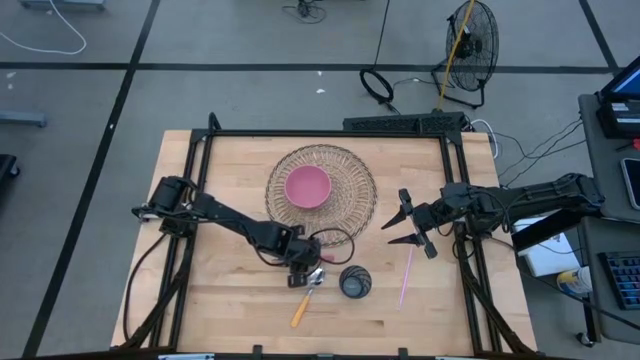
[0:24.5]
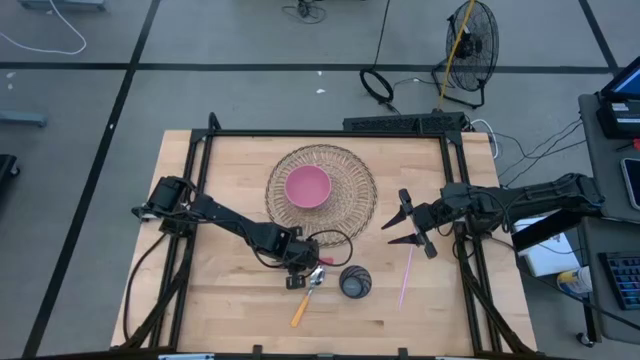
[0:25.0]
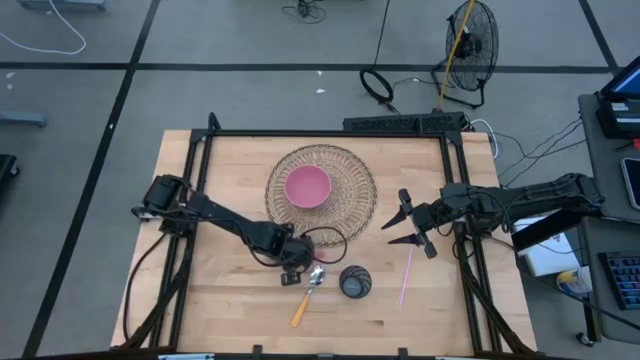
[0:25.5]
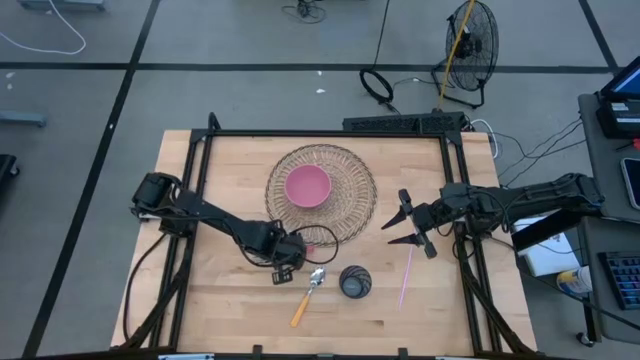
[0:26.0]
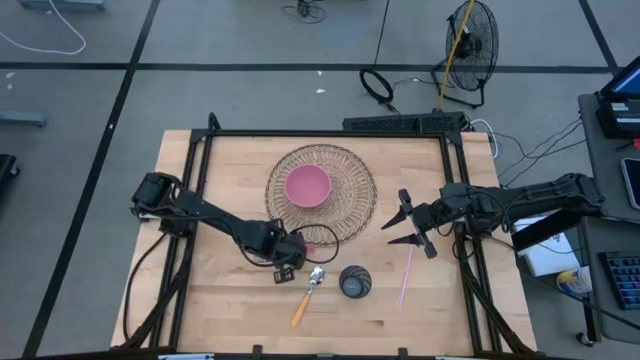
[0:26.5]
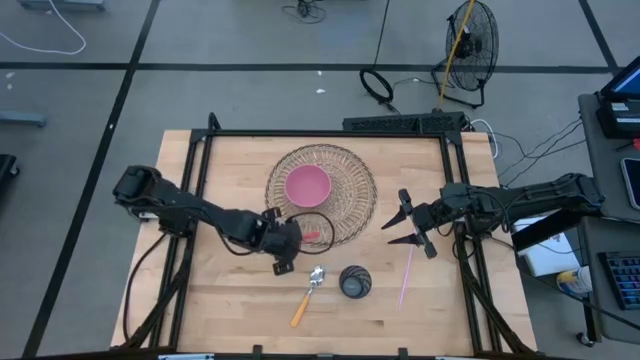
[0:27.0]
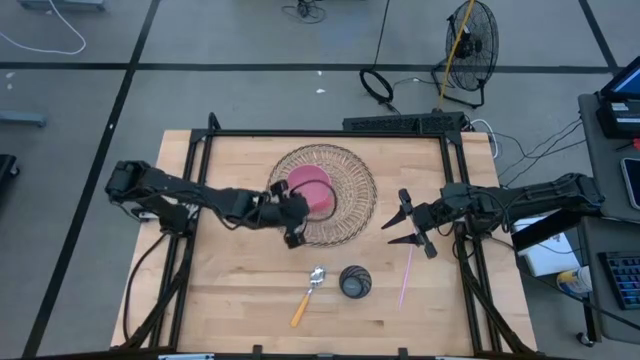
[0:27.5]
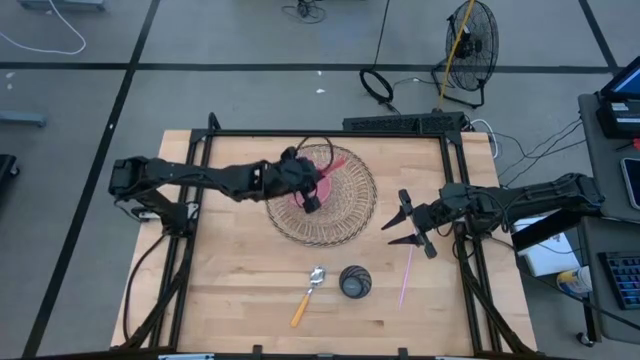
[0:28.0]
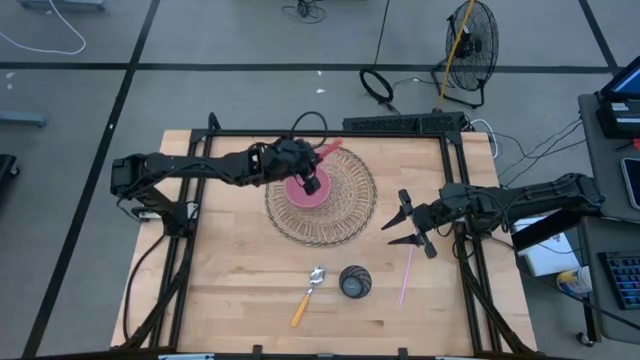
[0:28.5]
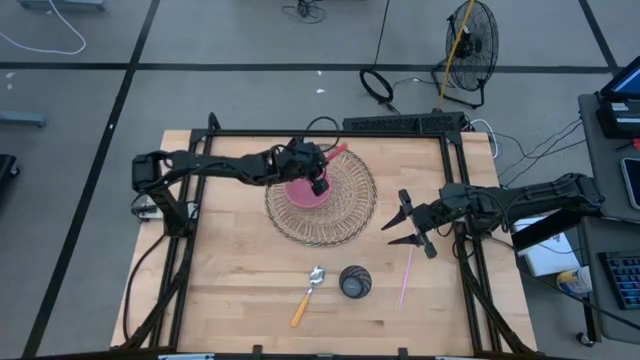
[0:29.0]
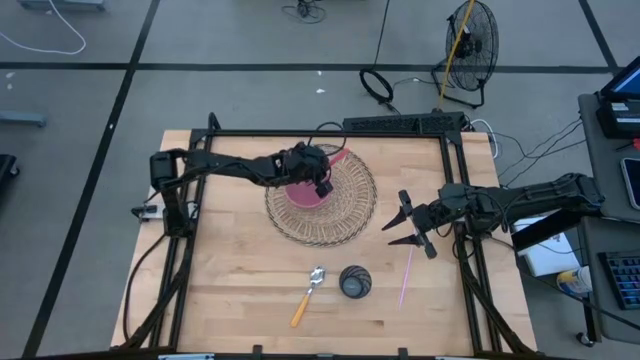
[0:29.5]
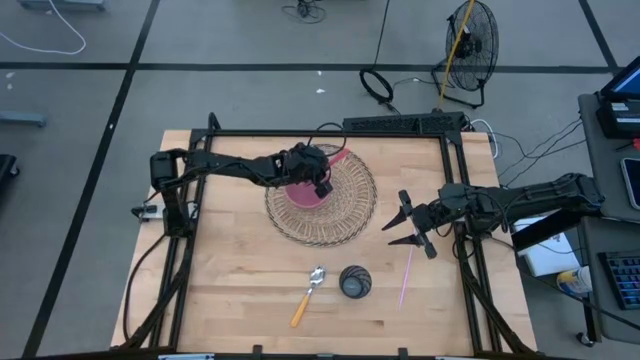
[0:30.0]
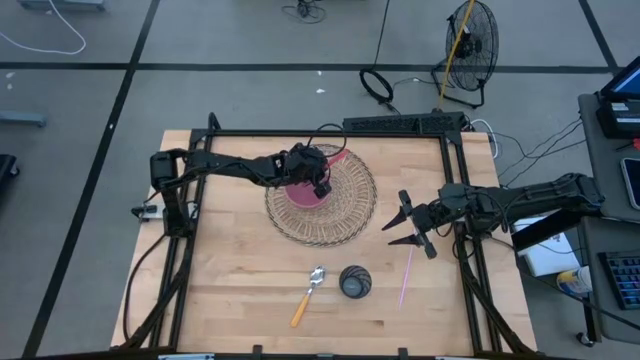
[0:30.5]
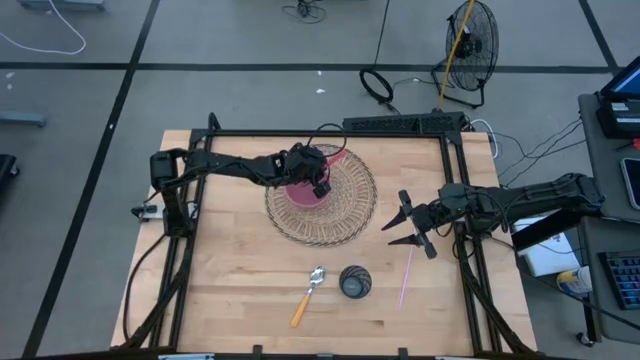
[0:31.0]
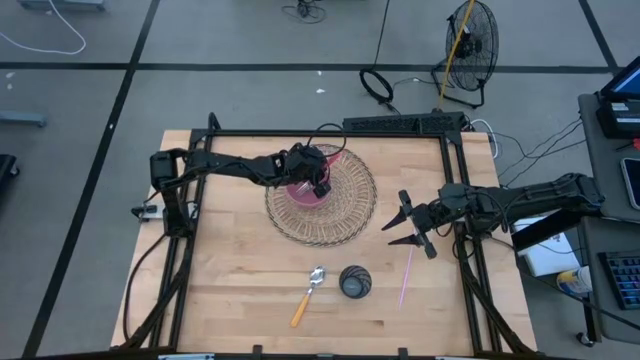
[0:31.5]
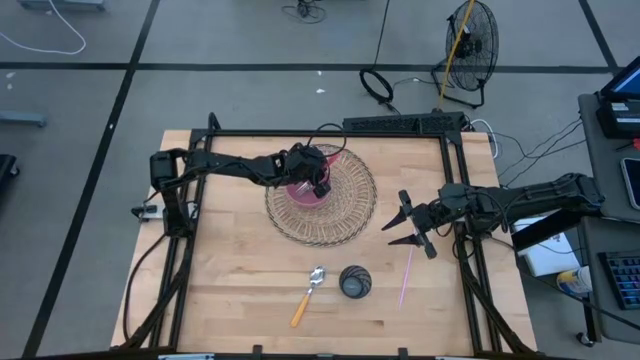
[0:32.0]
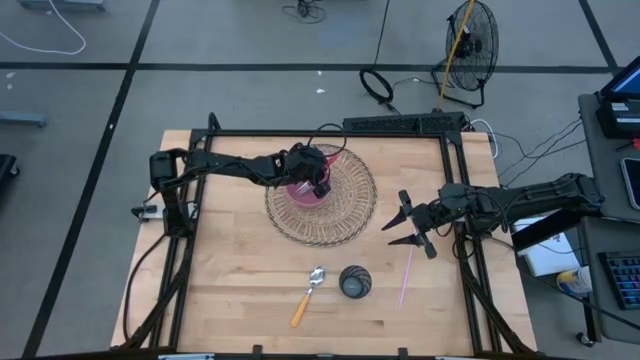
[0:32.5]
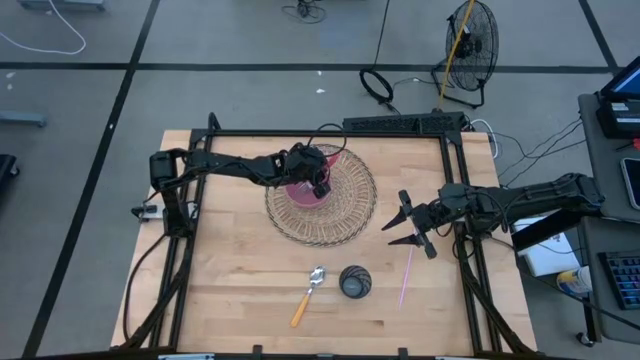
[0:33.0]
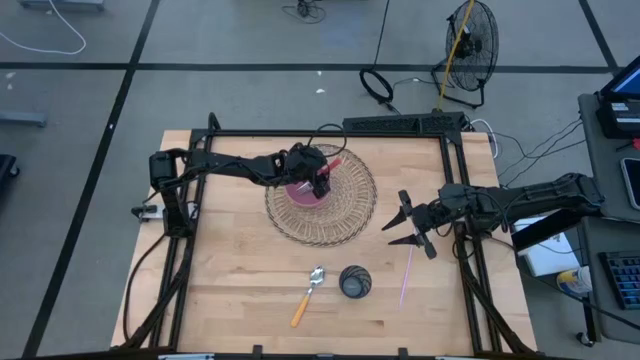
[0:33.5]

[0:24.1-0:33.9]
Task: Pick & Place Utensil
Put the red fork into the pink bowl on the woven mat

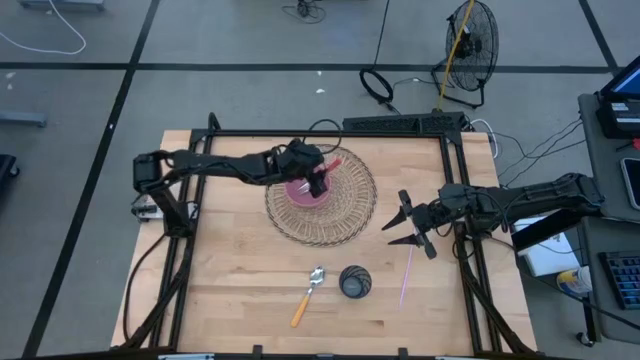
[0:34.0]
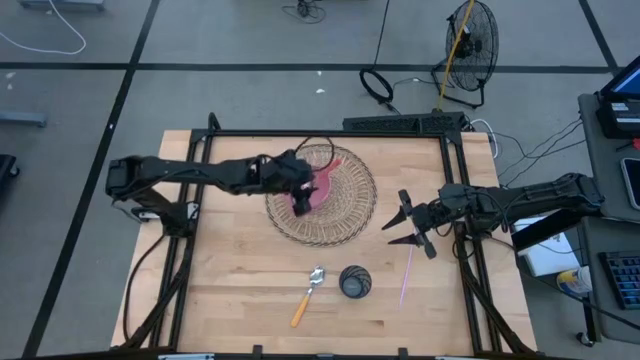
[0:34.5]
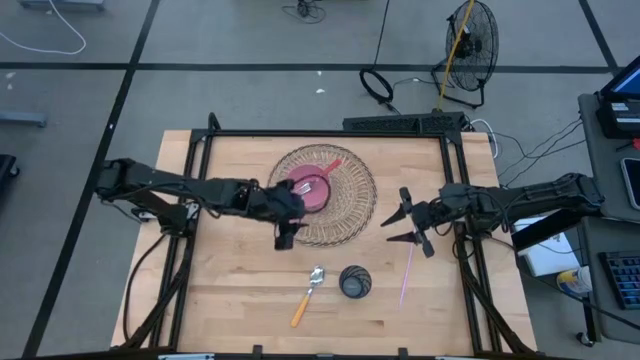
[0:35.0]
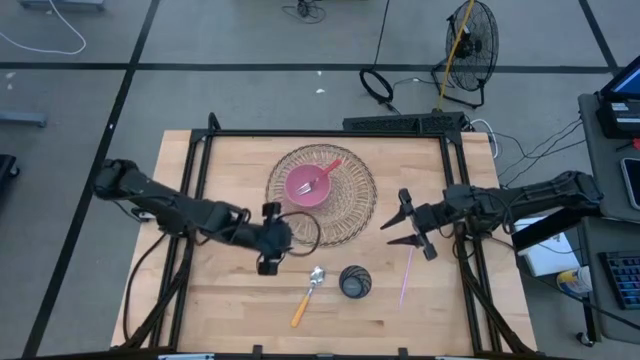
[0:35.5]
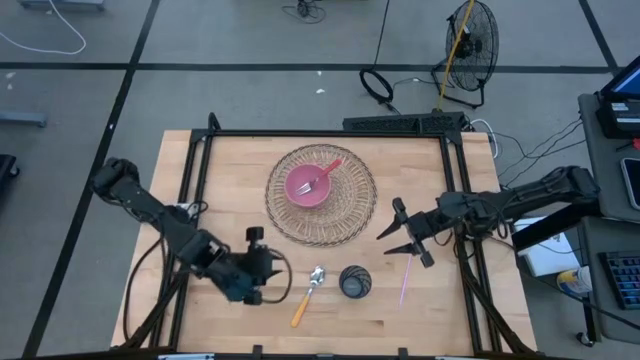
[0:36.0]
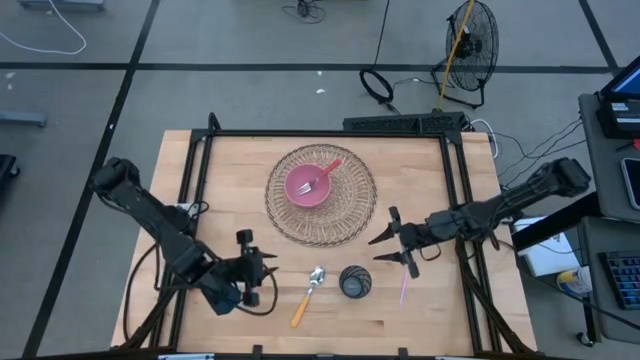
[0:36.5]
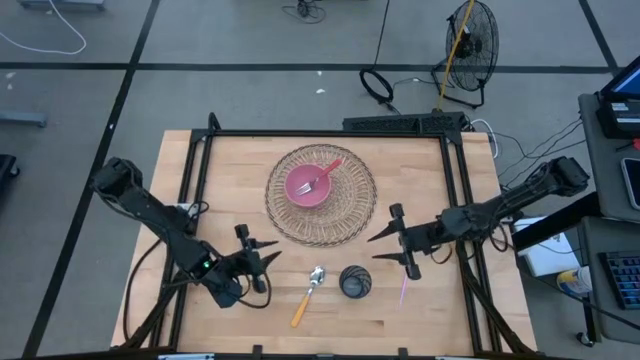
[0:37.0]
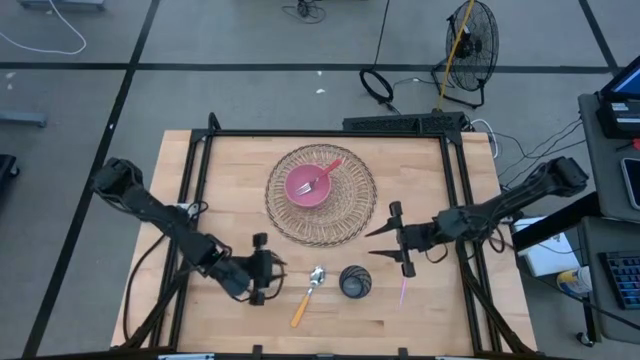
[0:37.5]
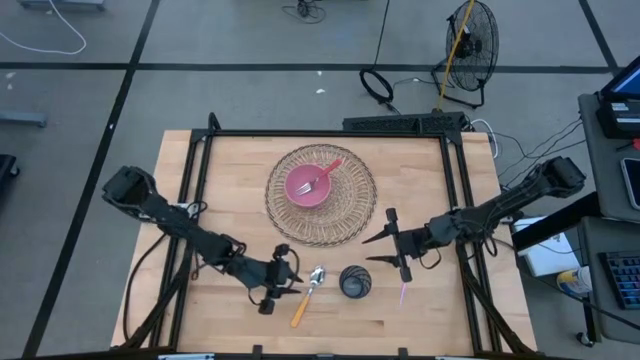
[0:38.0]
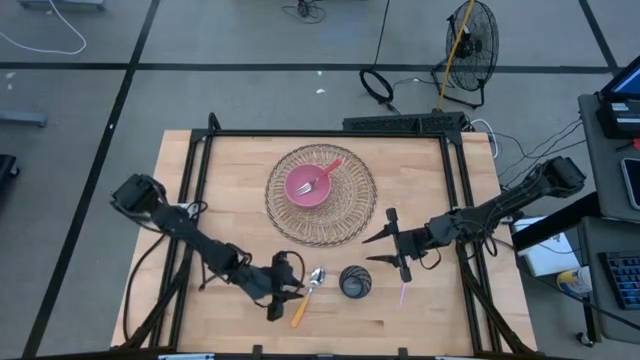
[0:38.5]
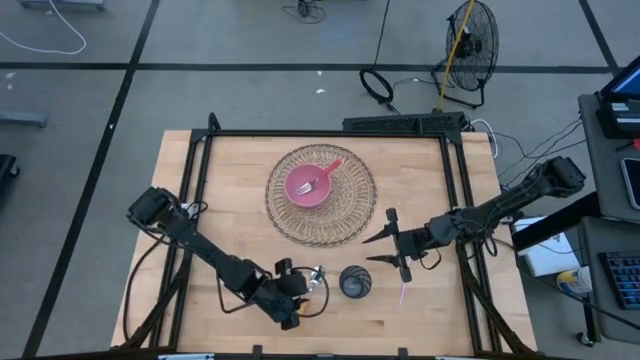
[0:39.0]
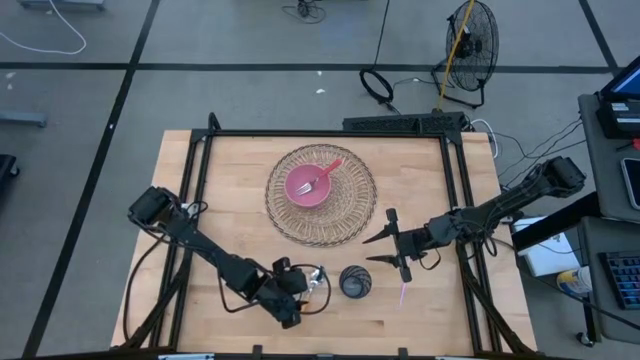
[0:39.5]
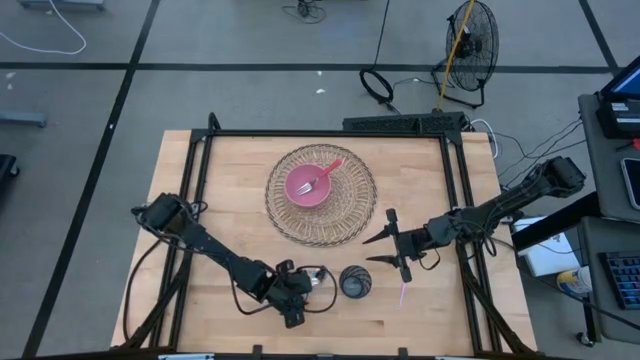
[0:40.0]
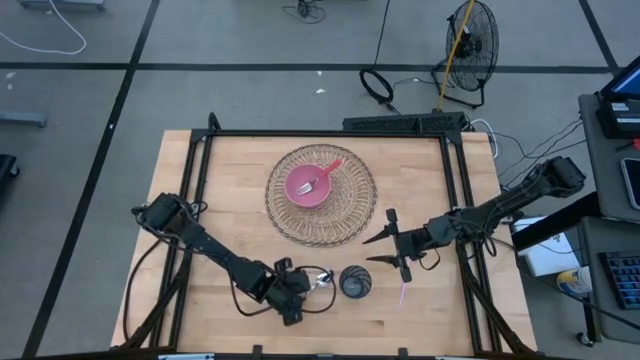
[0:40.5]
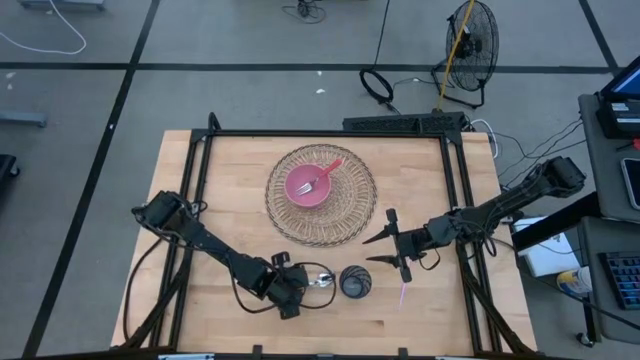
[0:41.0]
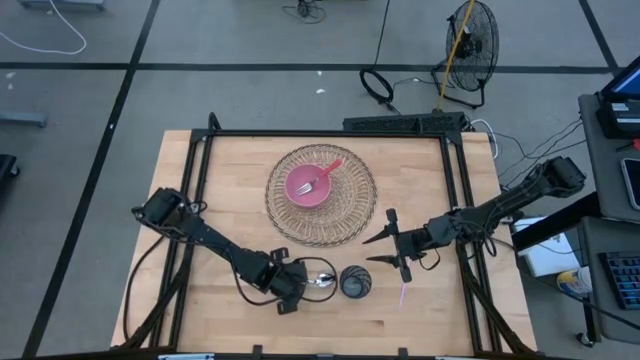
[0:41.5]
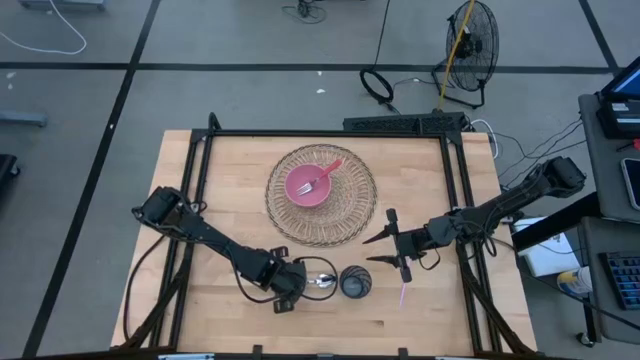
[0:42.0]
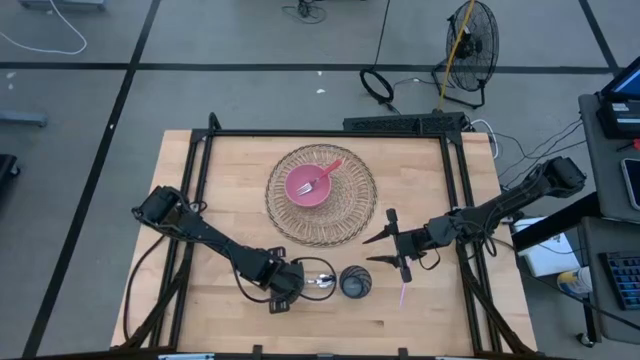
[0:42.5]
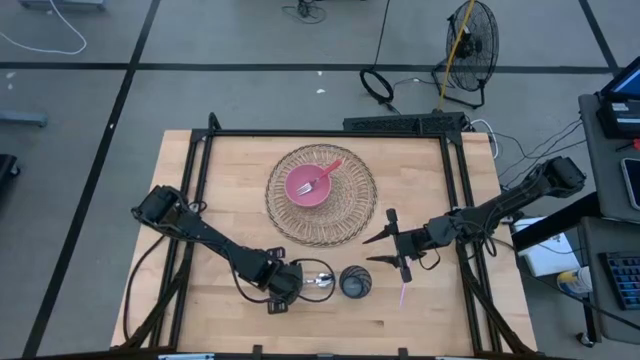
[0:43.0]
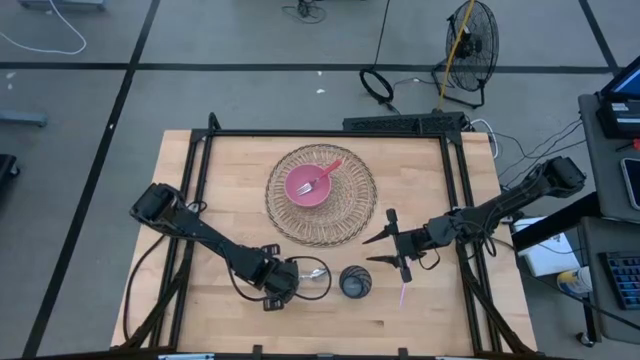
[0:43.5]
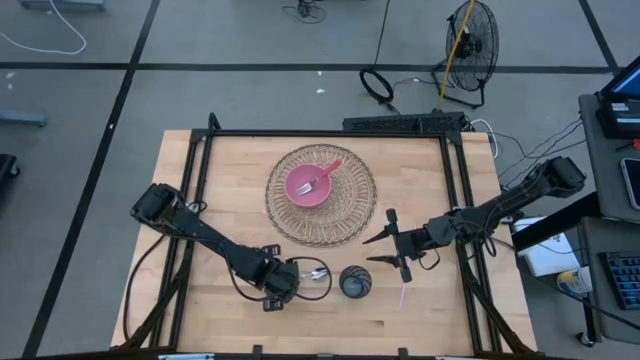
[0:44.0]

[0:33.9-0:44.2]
Put the orange spoon into the pink bowl on the woven mat

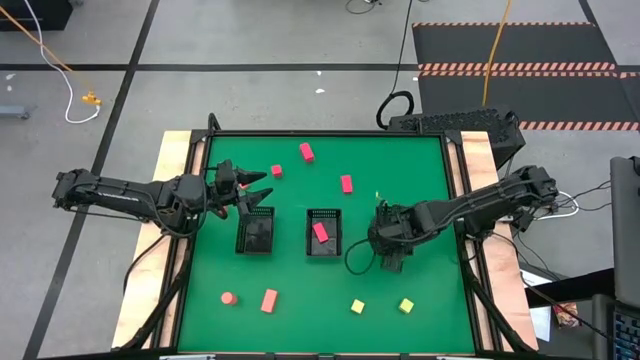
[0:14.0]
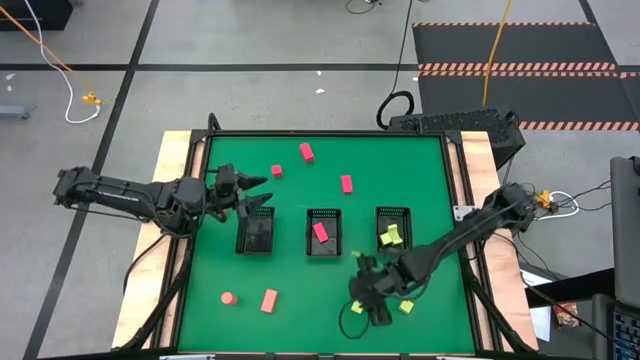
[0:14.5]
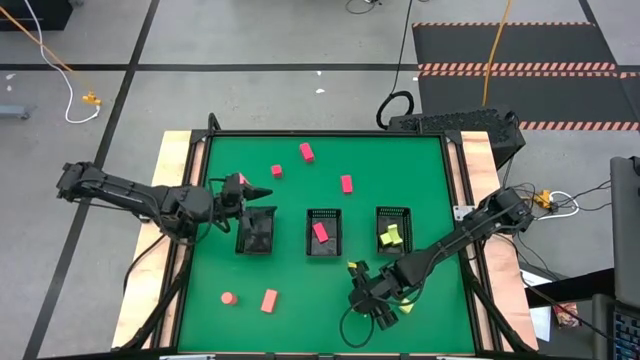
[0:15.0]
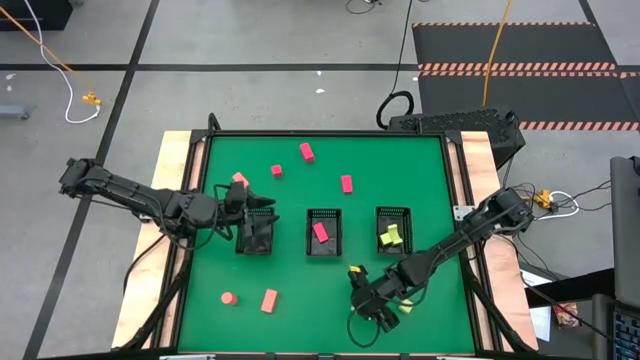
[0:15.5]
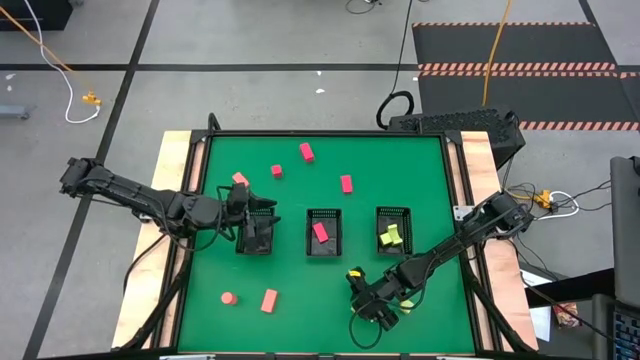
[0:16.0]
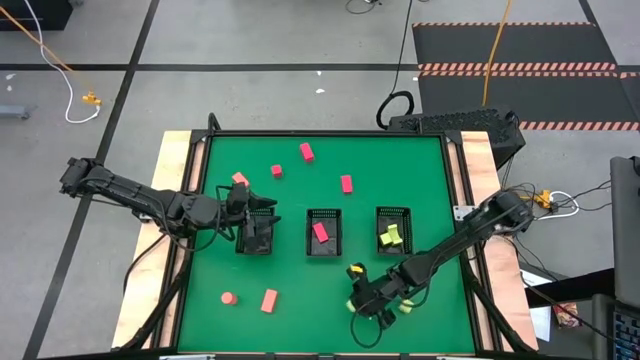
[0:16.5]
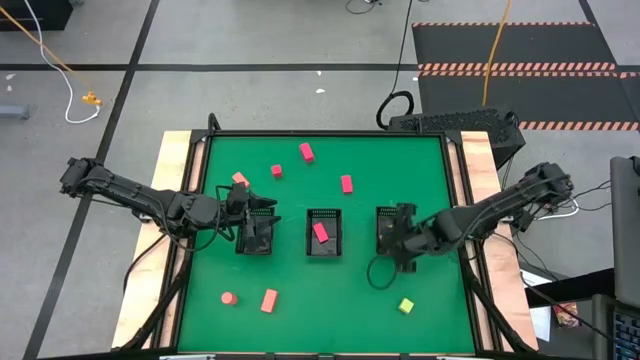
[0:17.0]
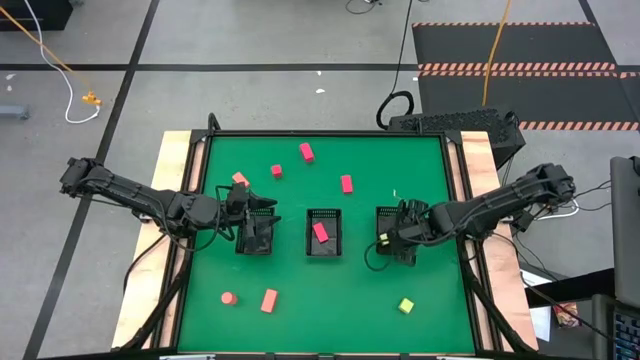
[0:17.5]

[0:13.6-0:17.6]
Task: Sort & place blocks by color
Put the green block into the right black basket
